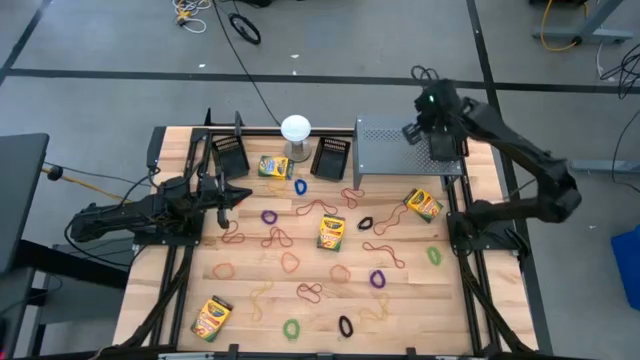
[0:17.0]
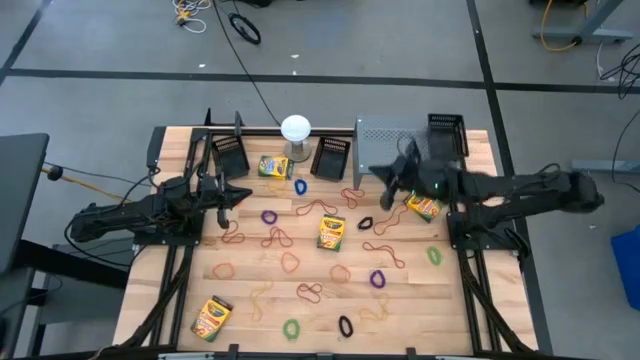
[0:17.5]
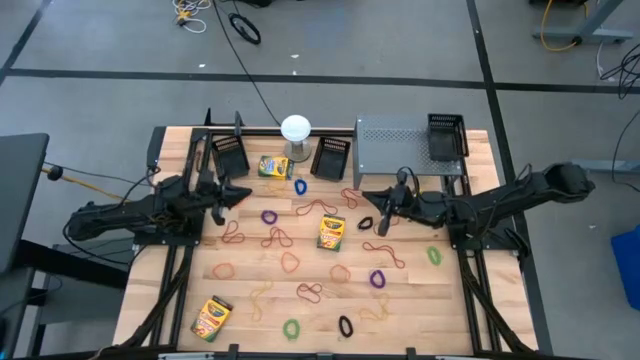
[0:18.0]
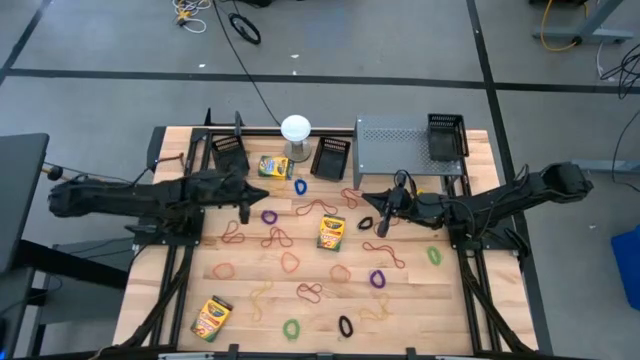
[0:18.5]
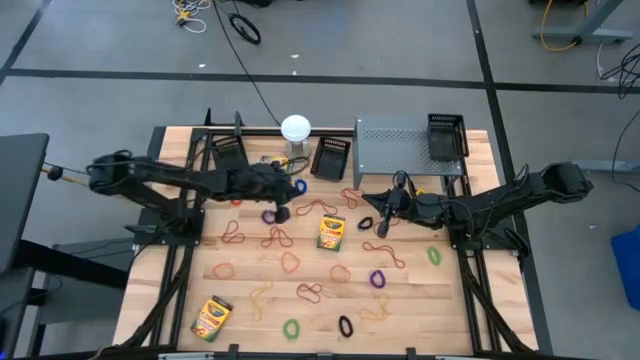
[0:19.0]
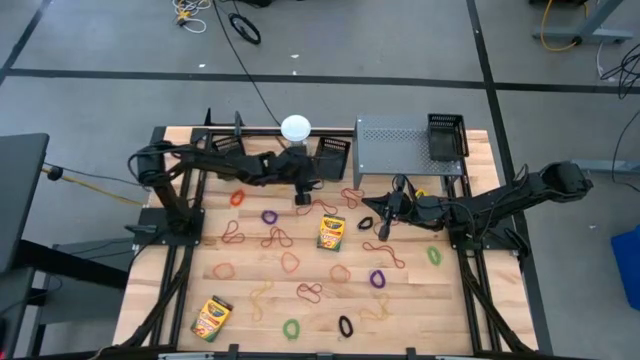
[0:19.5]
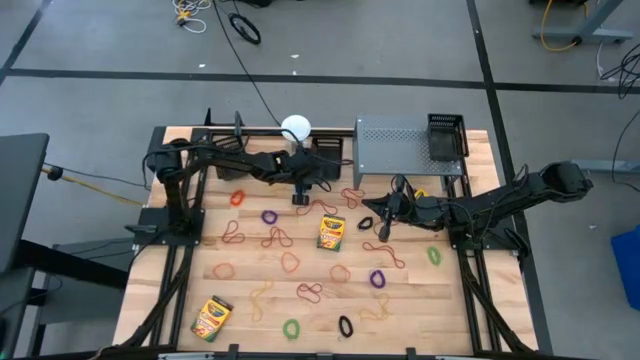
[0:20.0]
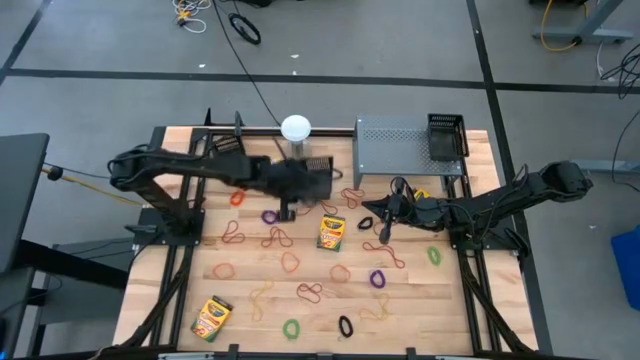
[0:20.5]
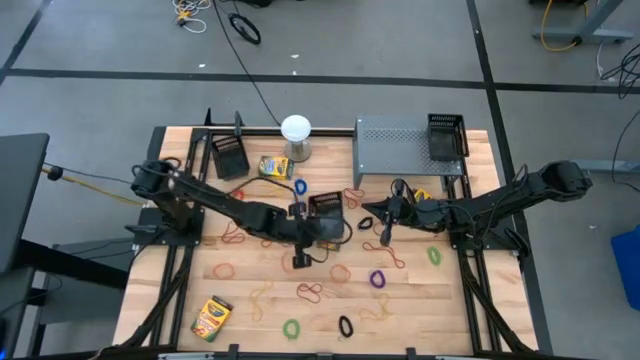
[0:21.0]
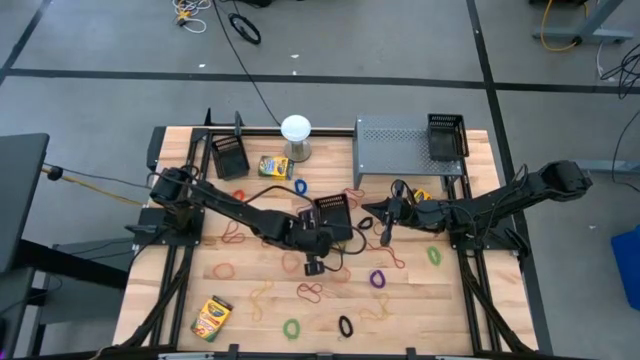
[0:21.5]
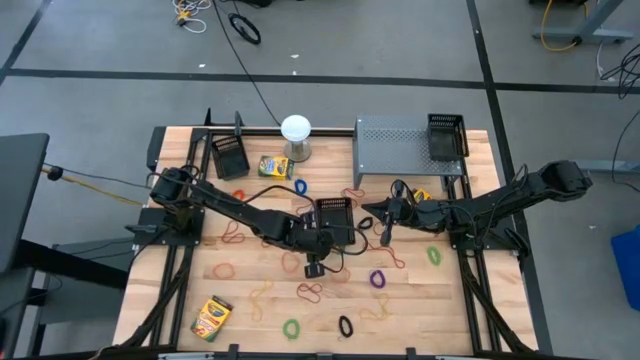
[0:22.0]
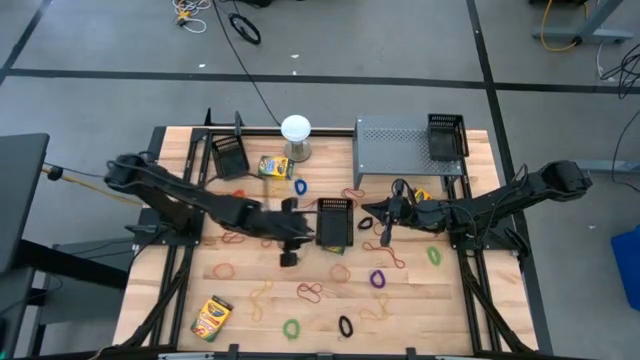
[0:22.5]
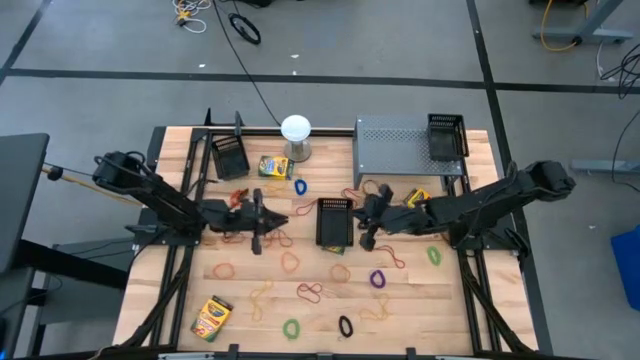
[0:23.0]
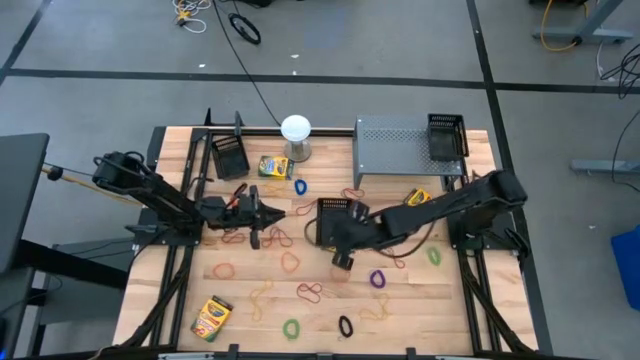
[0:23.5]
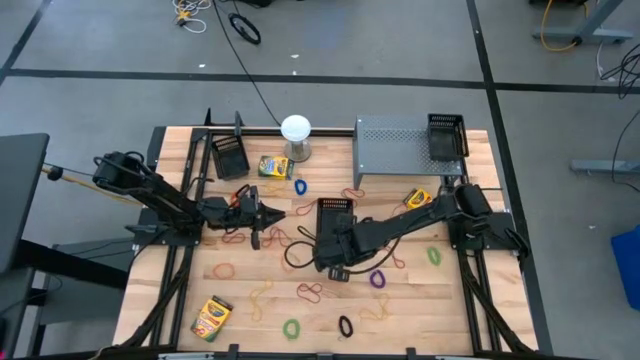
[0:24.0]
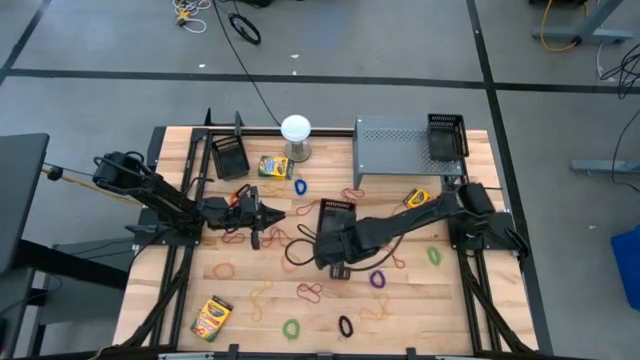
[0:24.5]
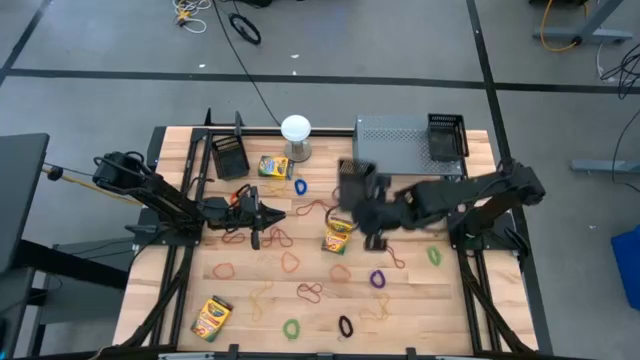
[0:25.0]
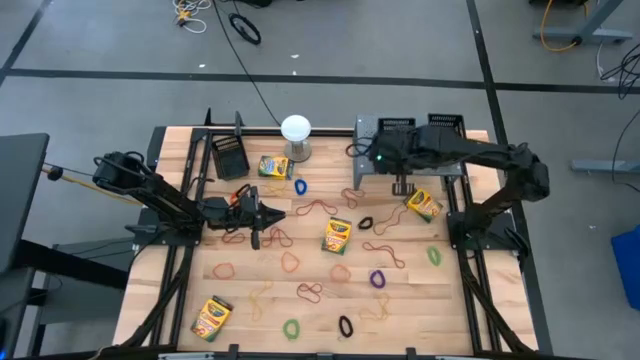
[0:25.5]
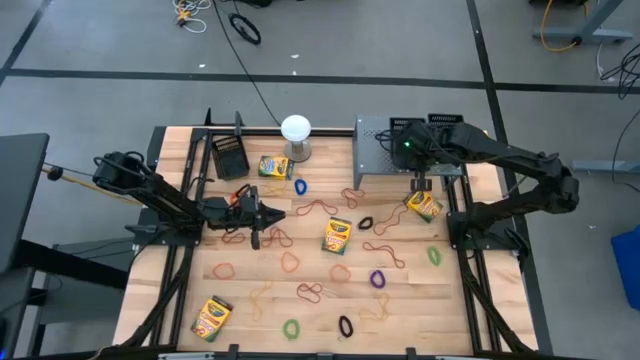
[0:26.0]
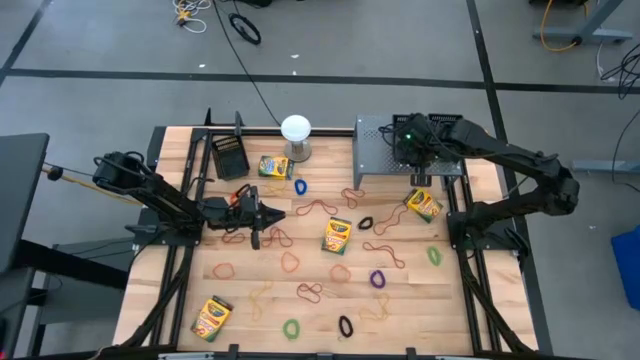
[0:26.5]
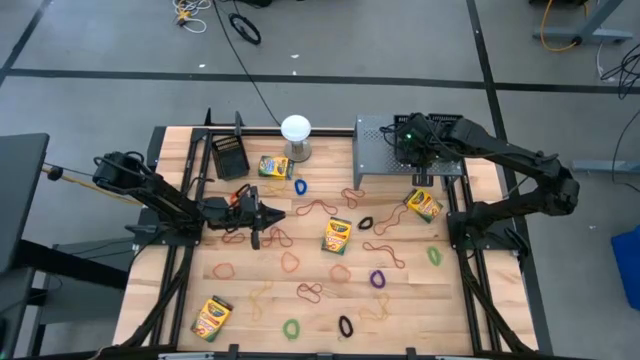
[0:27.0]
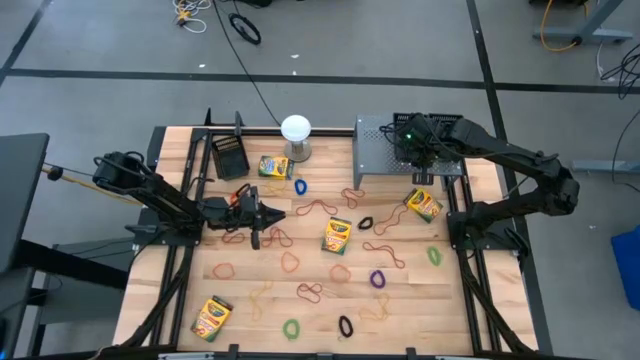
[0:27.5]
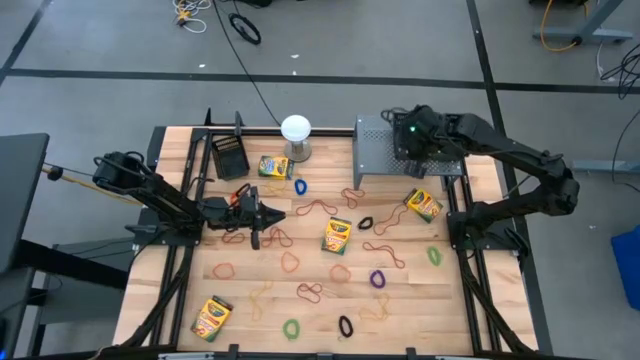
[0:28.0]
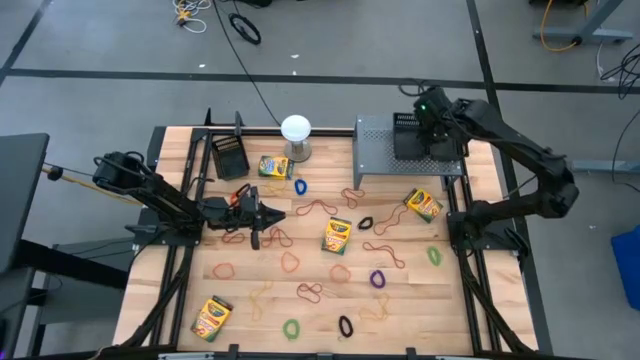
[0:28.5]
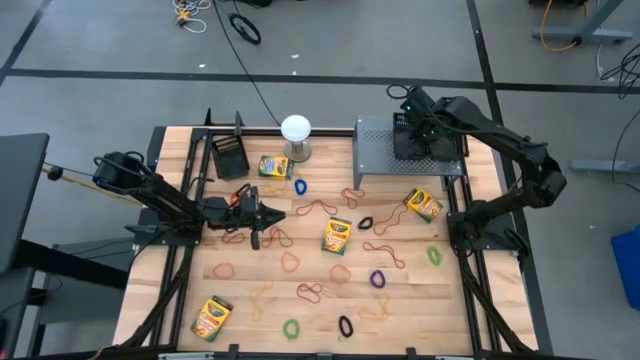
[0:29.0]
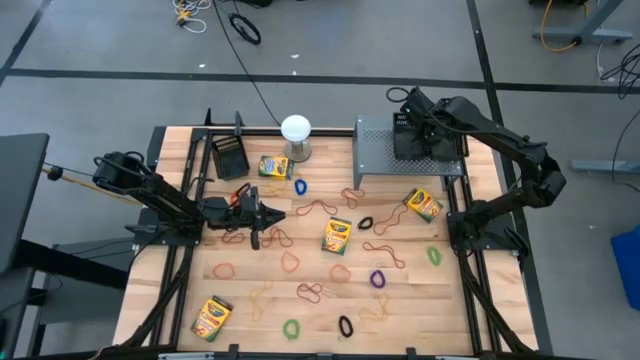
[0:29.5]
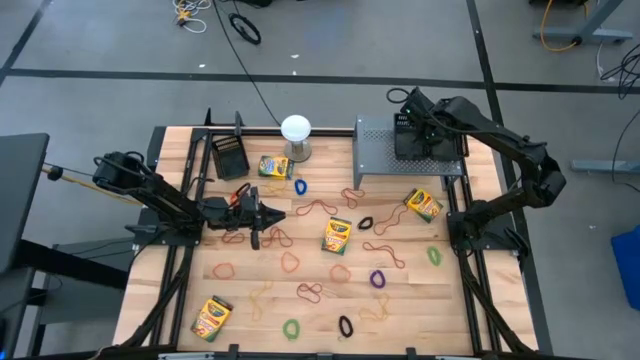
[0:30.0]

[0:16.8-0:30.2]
Task: Pick & Place Office Desk Supplies
Put the black basket on the shelf

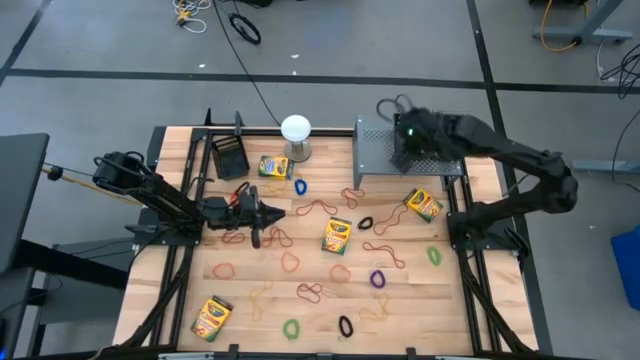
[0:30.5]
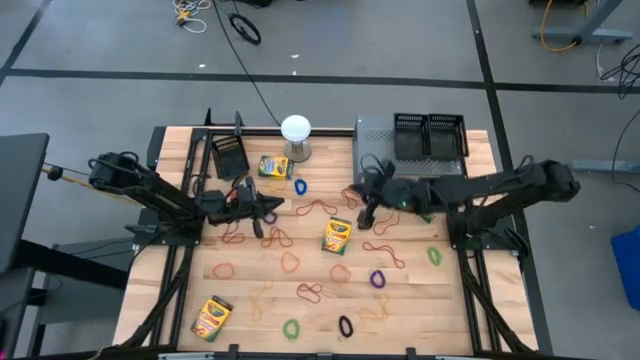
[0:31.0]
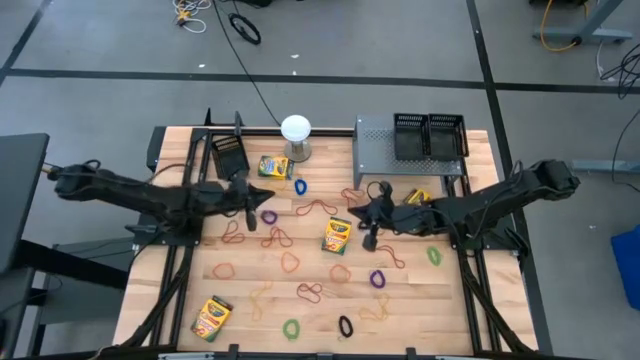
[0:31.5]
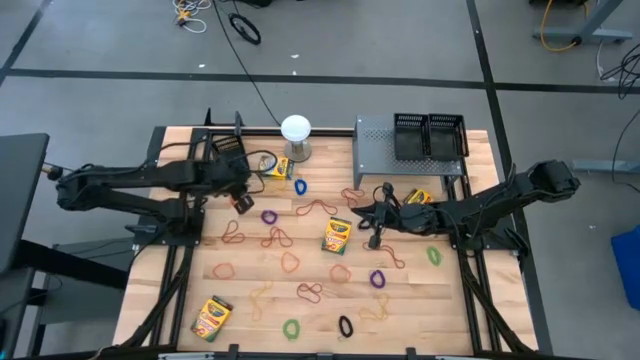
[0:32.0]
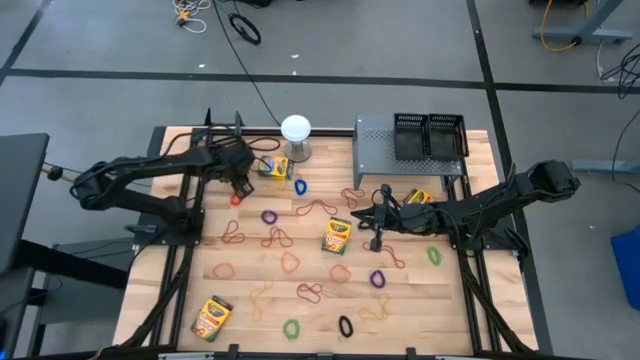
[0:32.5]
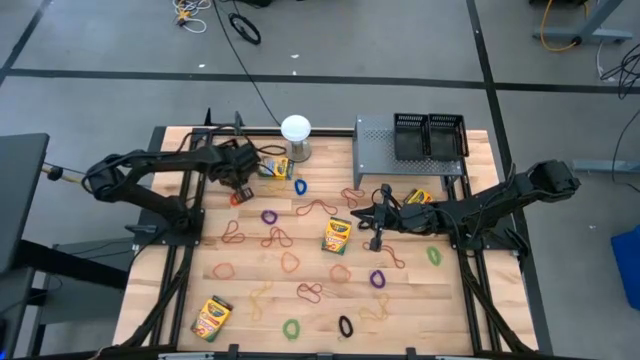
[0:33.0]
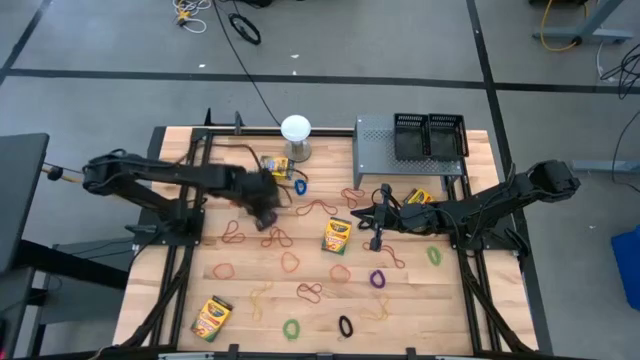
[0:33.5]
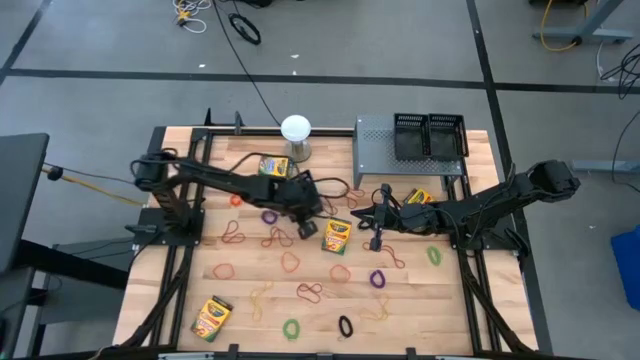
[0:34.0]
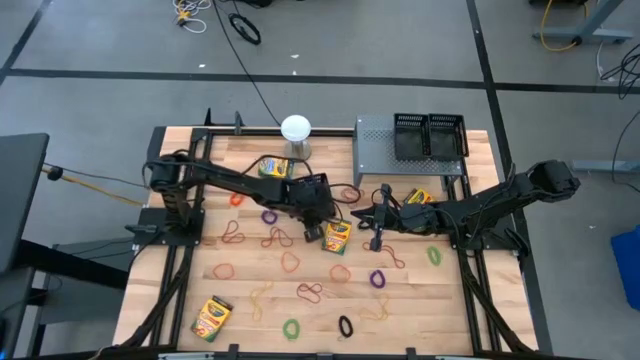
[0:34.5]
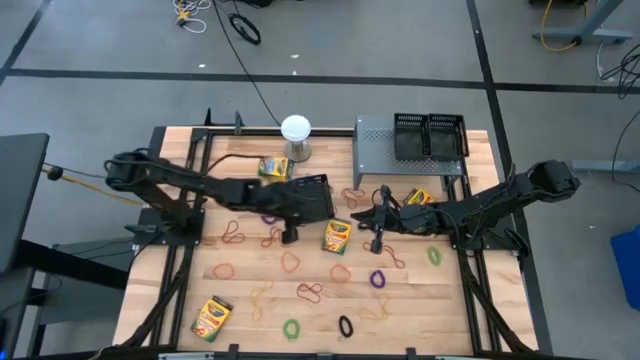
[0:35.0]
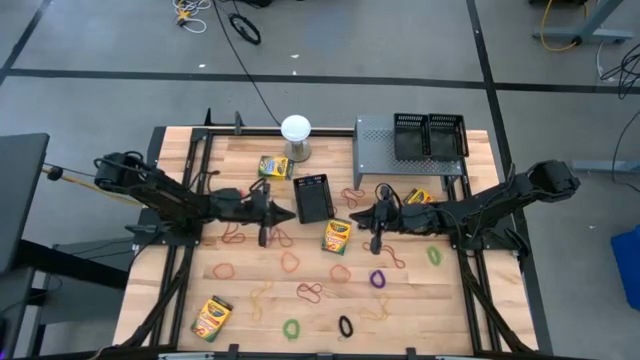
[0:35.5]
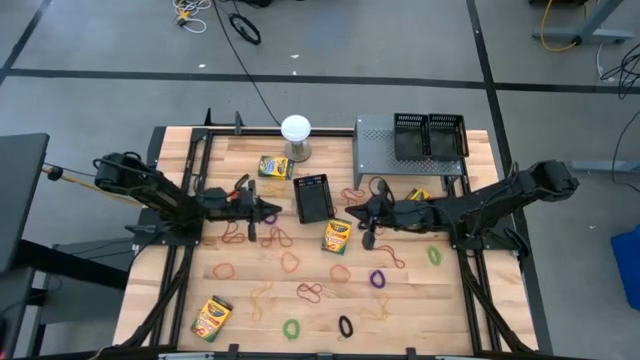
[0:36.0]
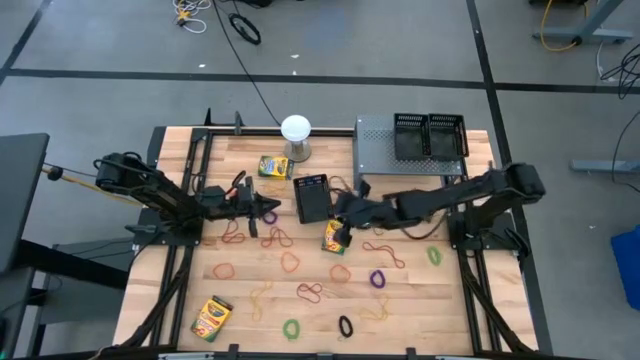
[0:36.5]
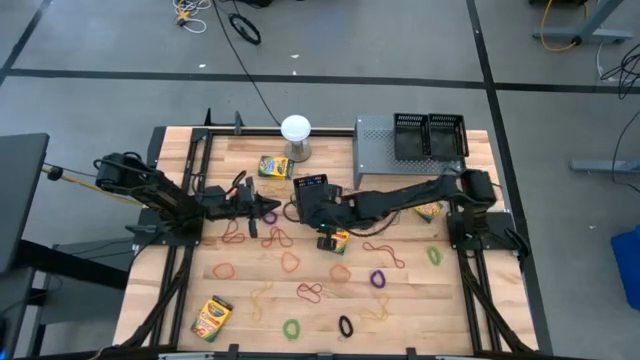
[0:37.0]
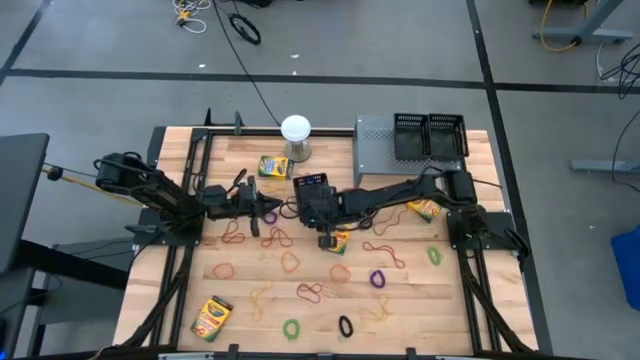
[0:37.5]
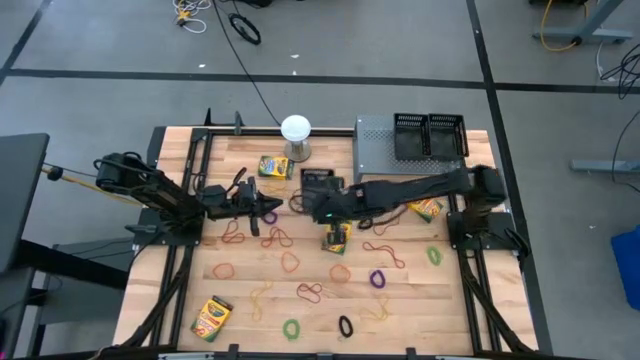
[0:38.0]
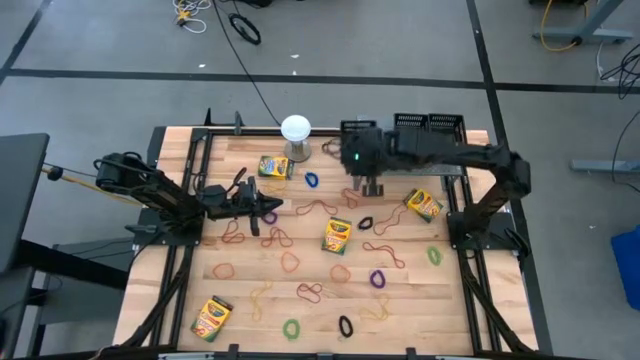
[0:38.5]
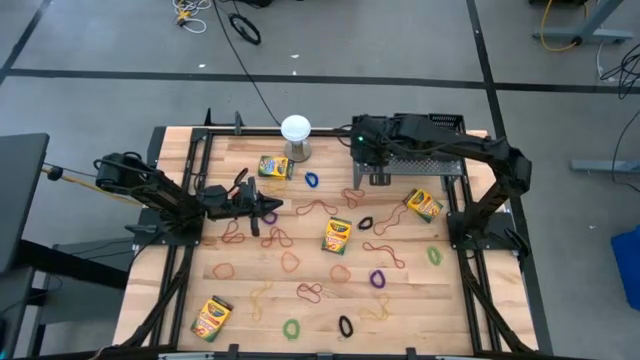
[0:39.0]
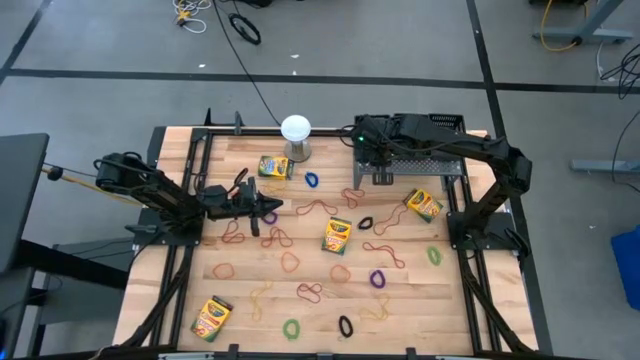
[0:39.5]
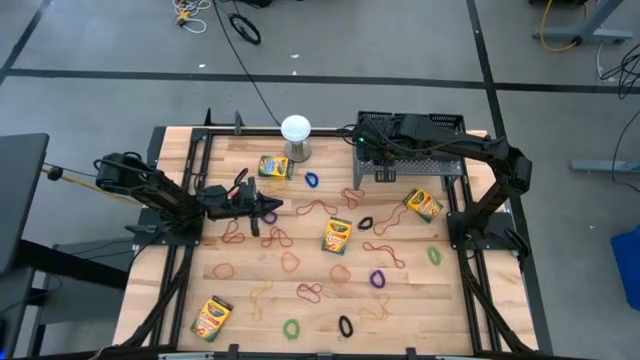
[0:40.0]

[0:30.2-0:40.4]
Put the black basket on the shelf
